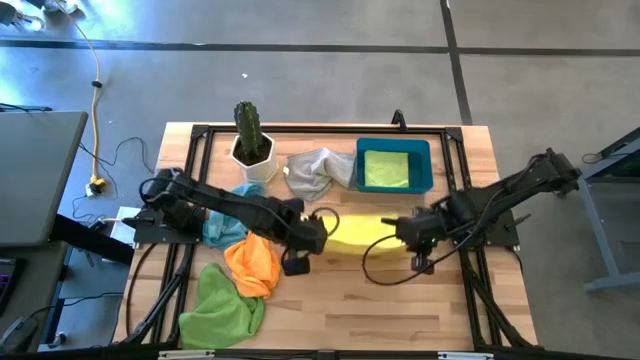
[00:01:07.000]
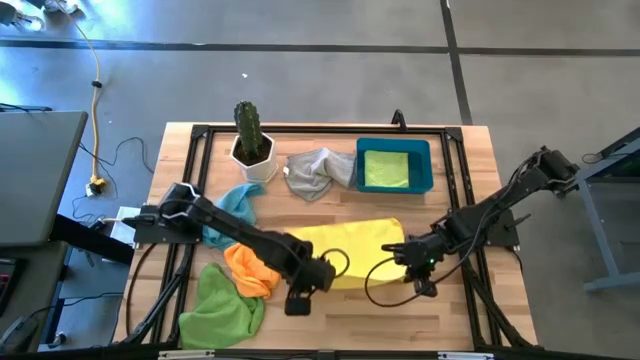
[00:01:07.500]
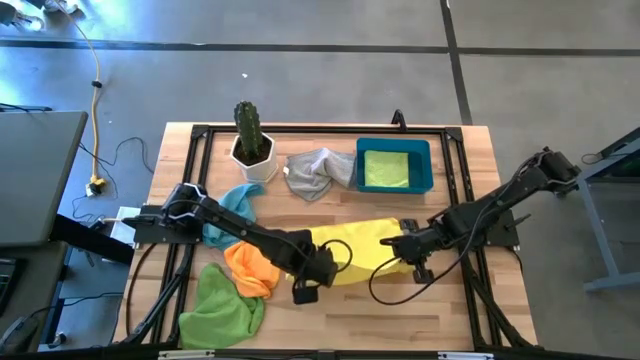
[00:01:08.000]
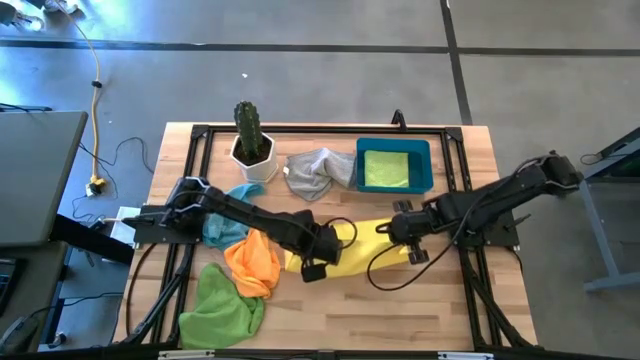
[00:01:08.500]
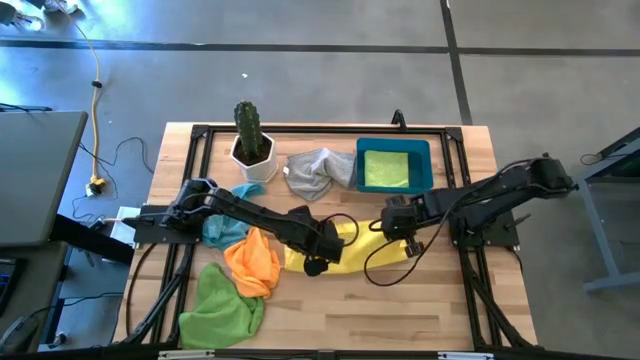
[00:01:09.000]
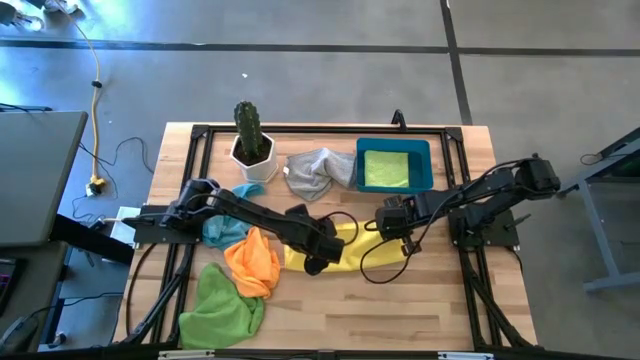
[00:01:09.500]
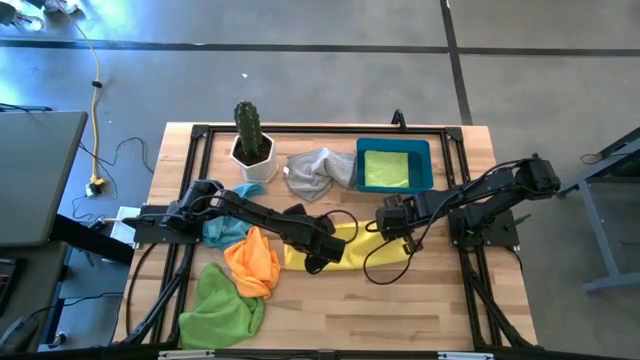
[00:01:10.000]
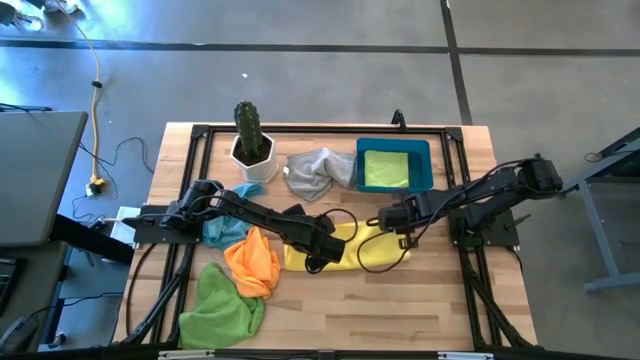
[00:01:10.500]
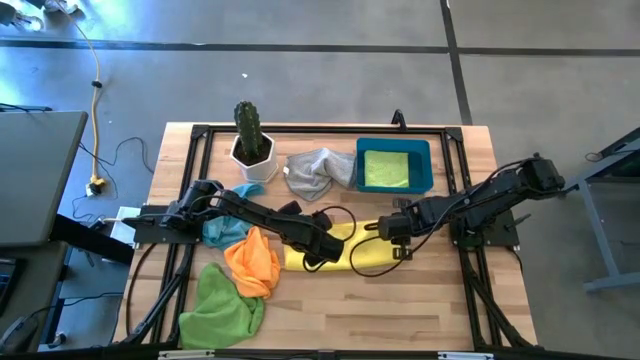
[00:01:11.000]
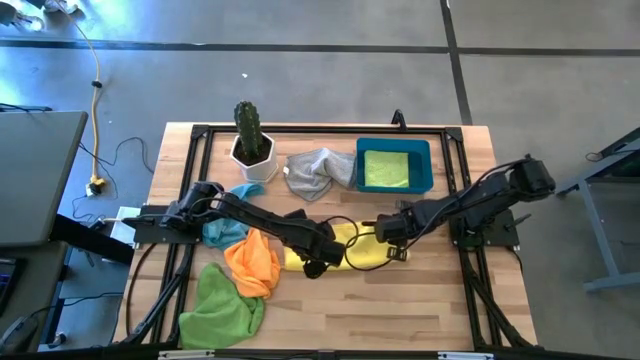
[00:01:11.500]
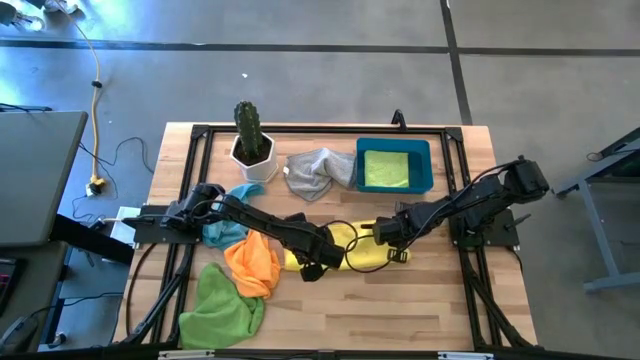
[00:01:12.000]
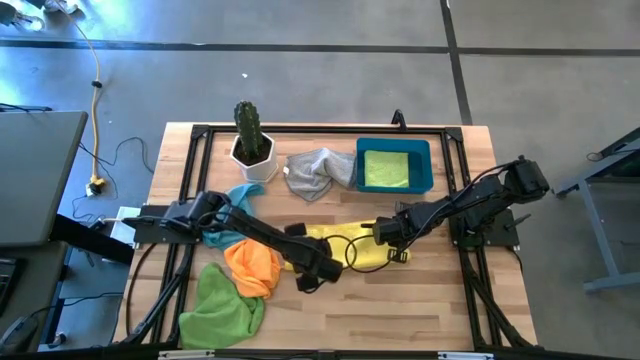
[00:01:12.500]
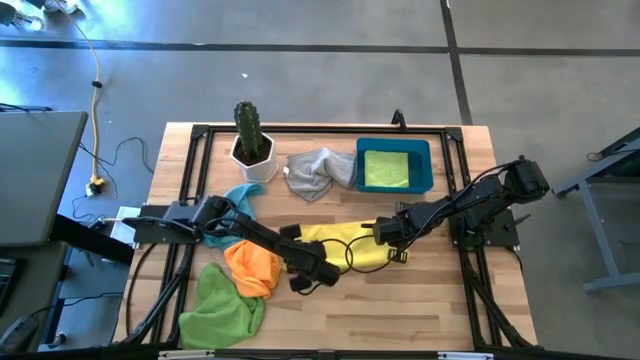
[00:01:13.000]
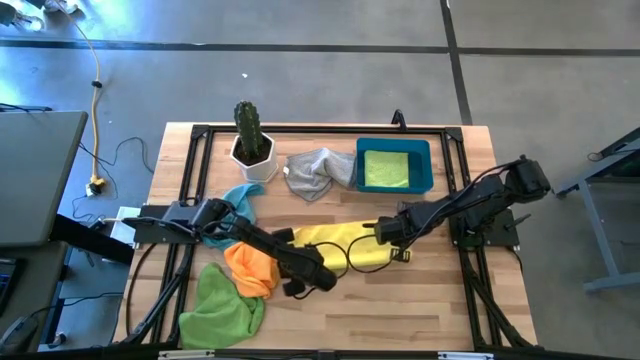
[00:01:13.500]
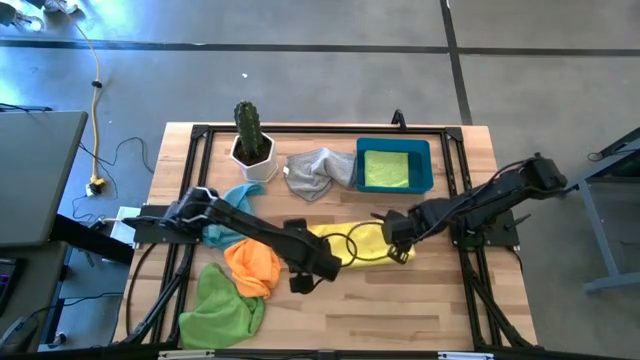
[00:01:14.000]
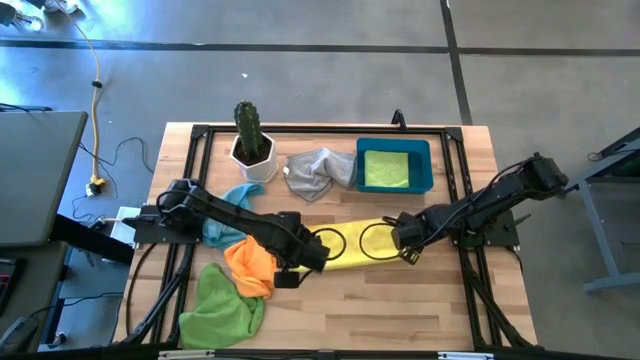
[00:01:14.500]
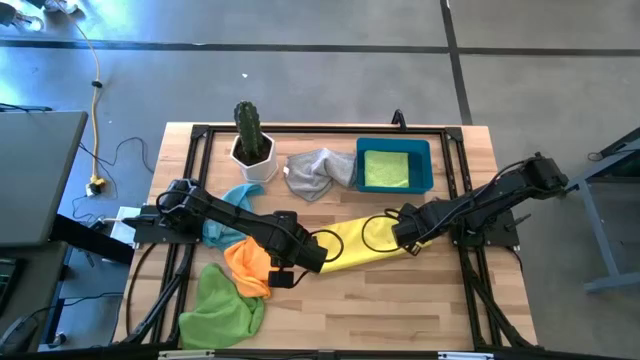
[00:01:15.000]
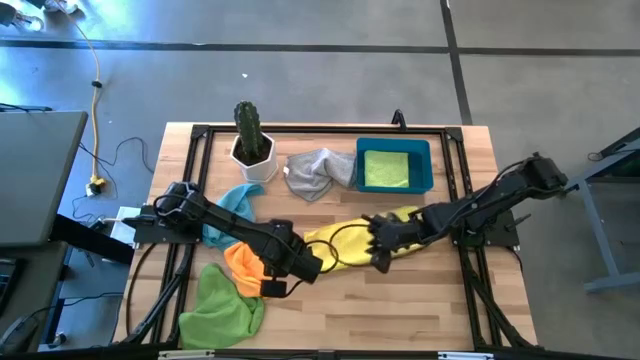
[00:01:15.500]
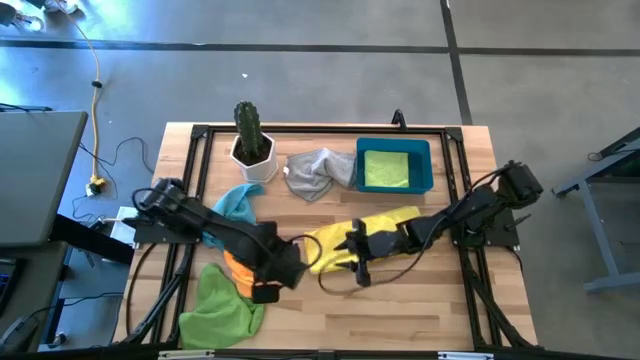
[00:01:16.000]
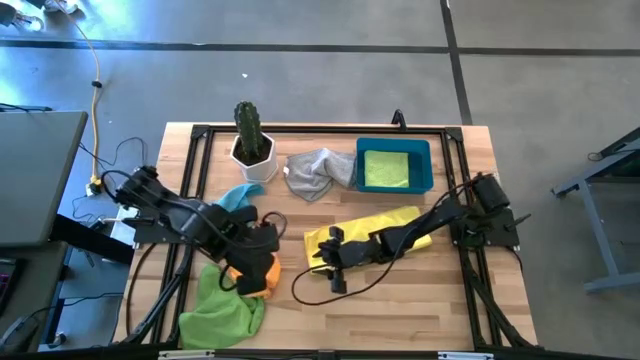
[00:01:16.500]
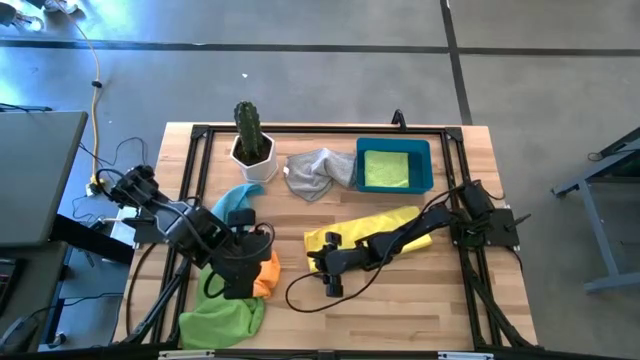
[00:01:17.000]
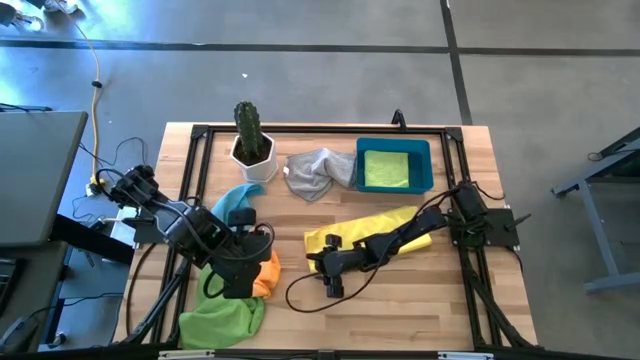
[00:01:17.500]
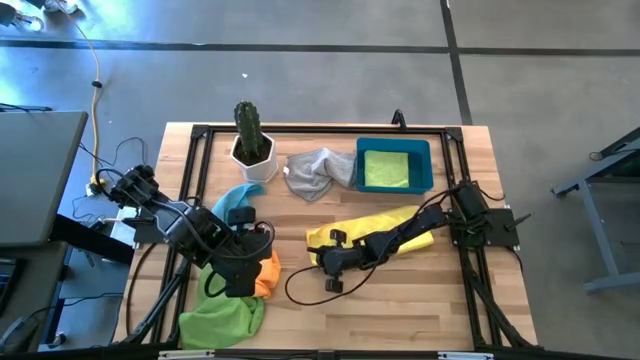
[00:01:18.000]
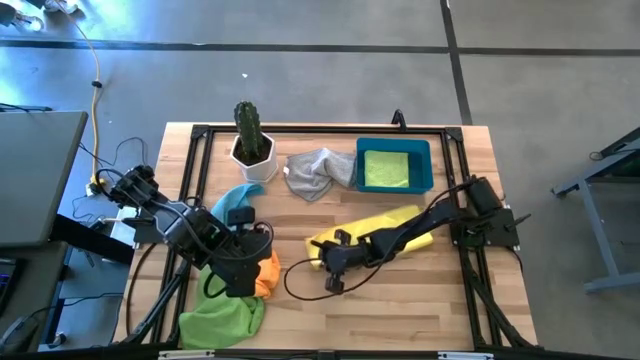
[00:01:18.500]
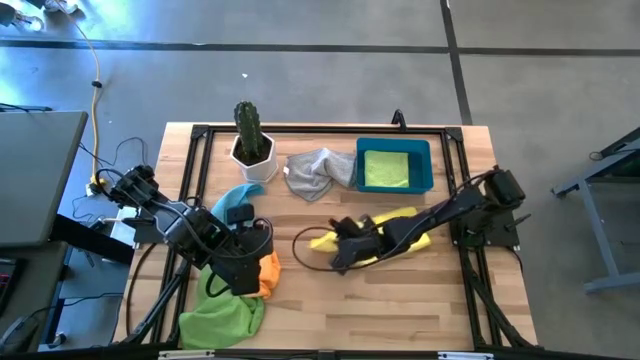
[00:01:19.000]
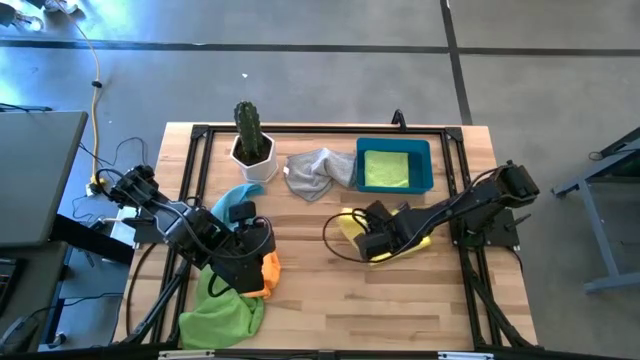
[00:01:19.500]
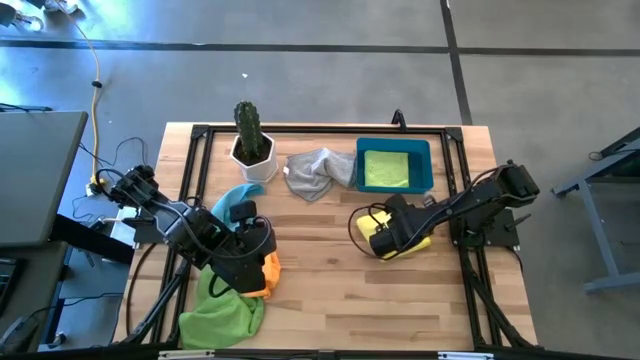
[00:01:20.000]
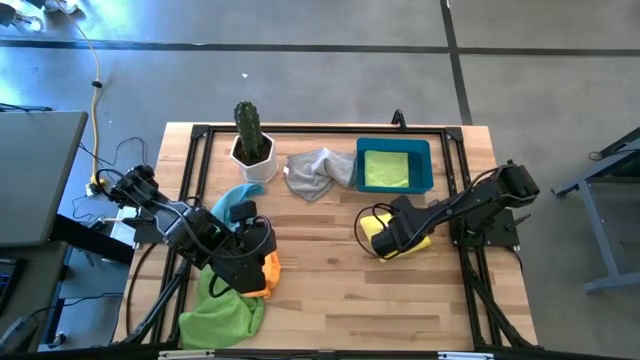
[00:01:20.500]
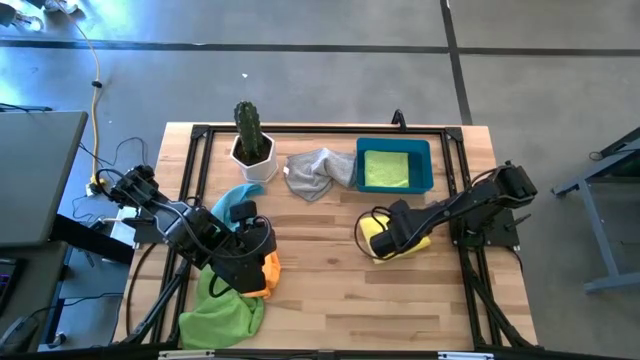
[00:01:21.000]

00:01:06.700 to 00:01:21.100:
Task: Fold microfiber towels
Fold the yellow microfiber cloth

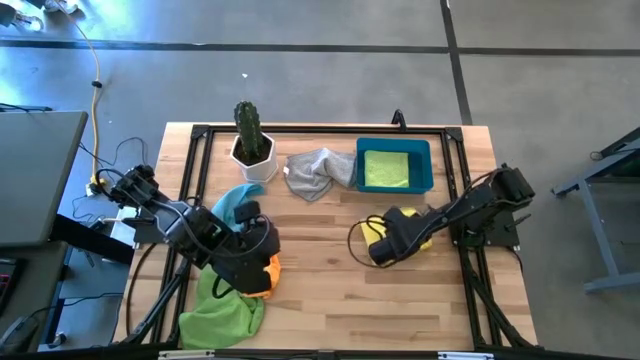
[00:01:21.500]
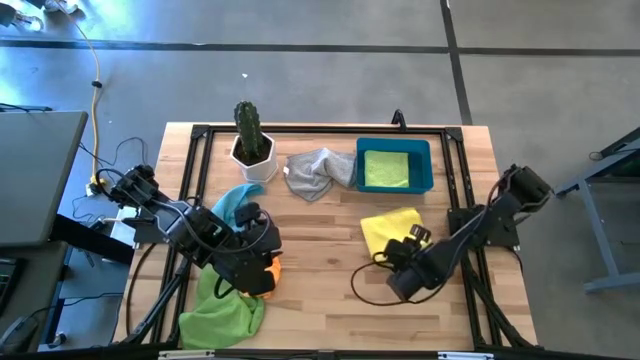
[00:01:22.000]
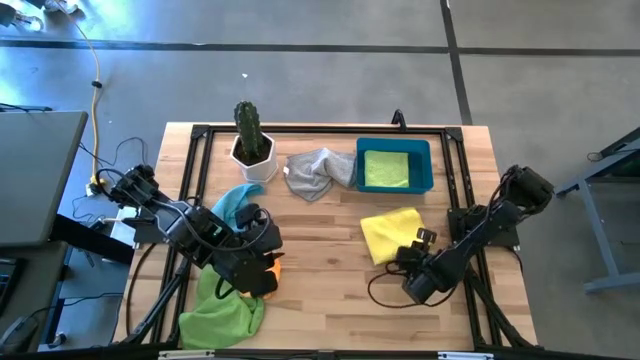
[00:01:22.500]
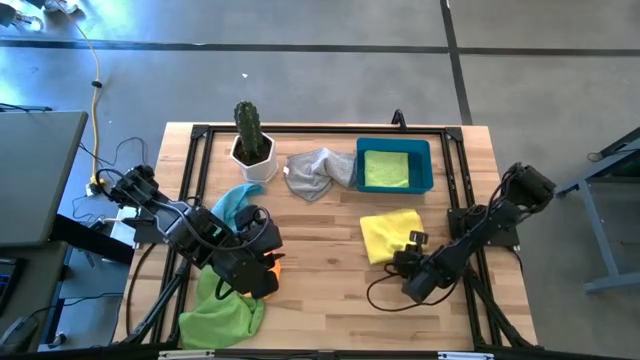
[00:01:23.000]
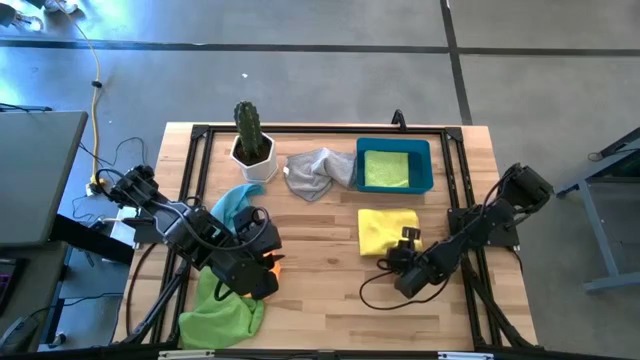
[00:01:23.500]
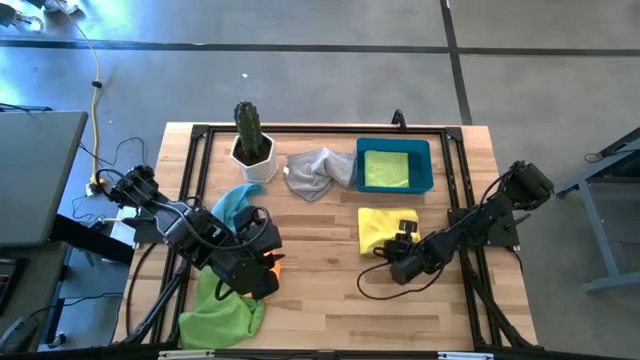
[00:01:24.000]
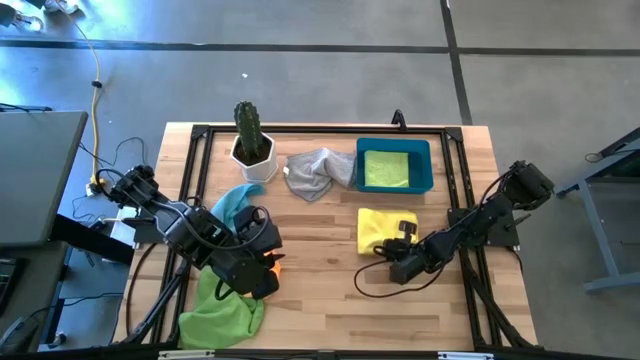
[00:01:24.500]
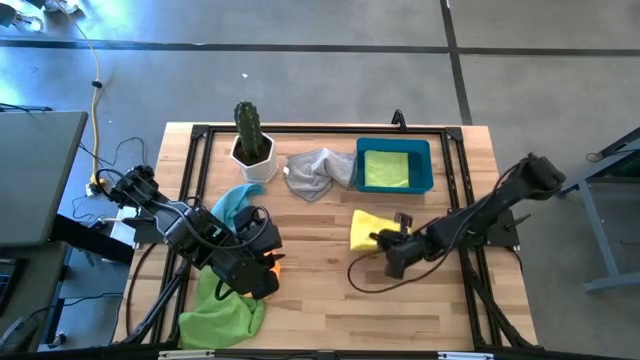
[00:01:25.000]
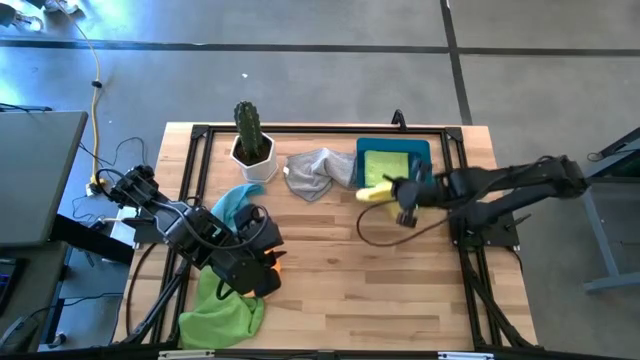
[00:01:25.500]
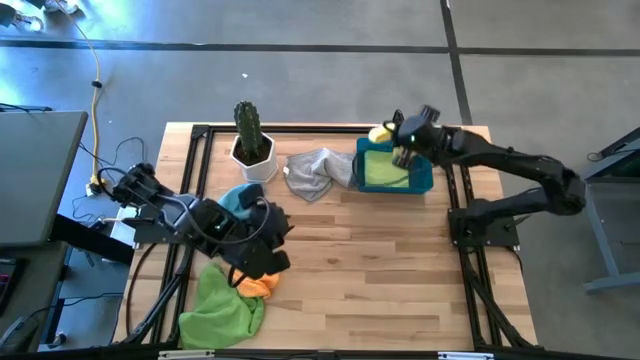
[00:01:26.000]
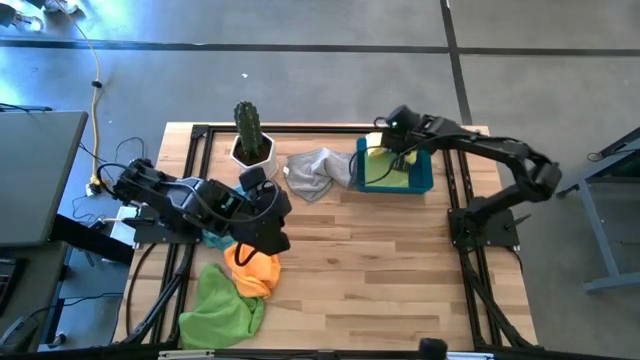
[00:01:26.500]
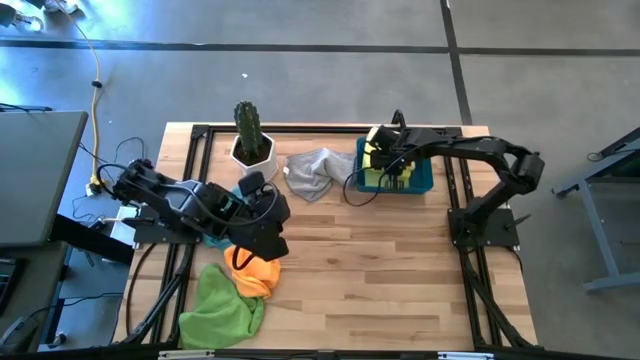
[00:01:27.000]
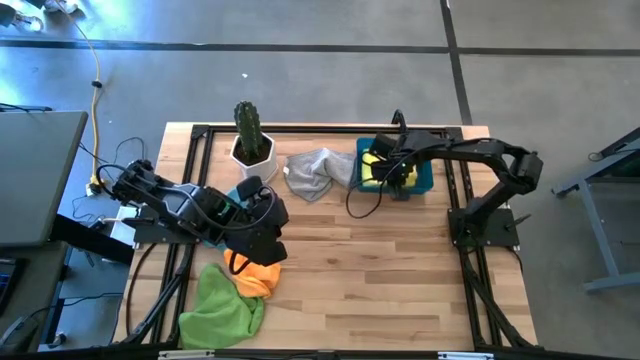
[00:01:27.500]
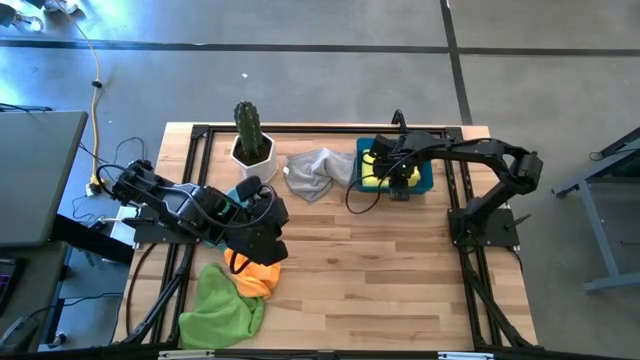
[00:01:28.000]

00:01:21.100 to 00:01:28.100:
Put the folded yellow microfiber cloth into the blue bin

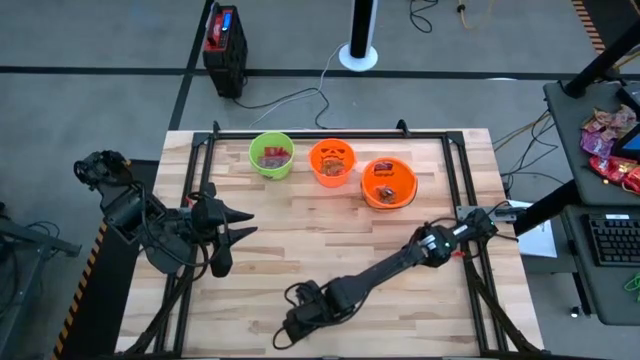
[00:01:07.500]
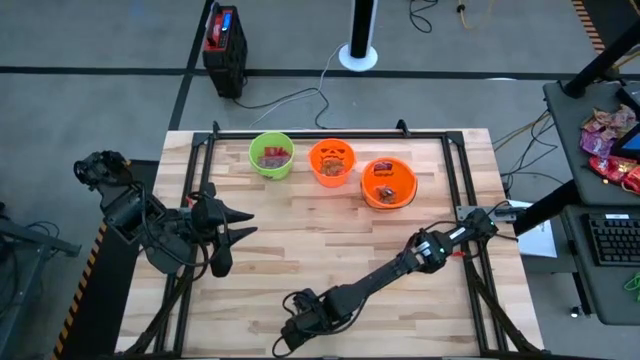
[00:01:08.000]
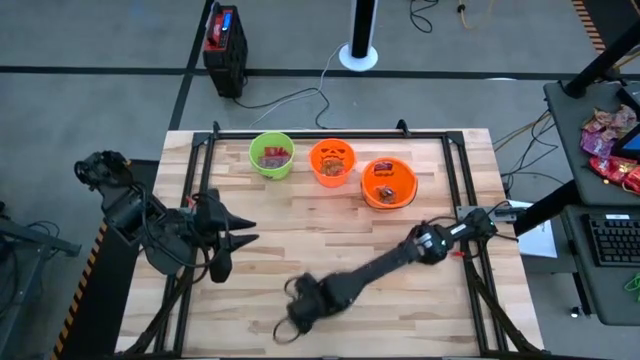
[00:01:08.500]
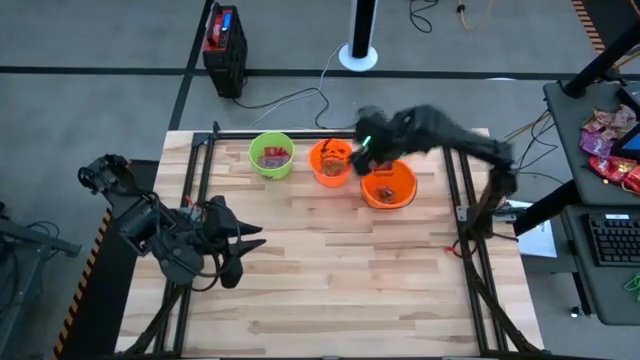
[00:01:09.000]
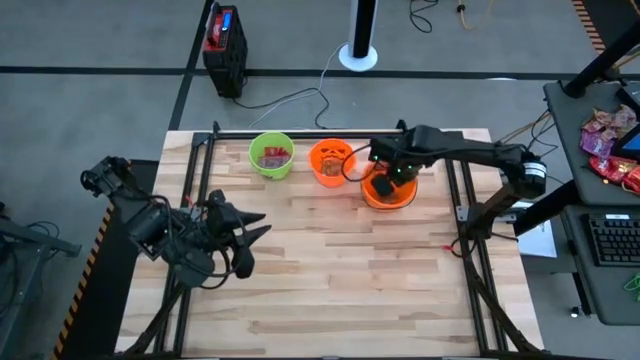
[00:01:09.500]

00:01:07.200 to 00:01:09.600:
Task: Sort candy by brand, put in halloween buckets
Put the black candy into the right orange bucket
